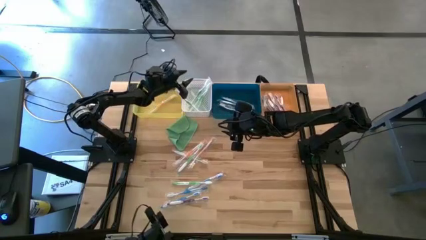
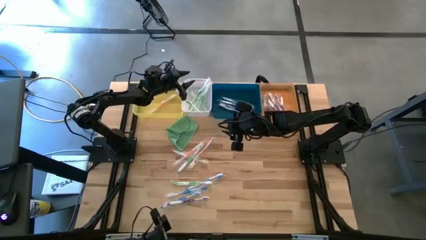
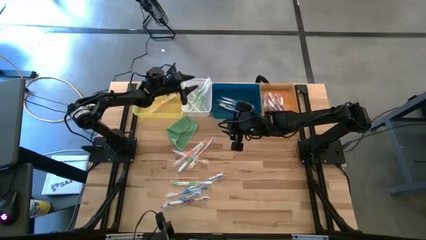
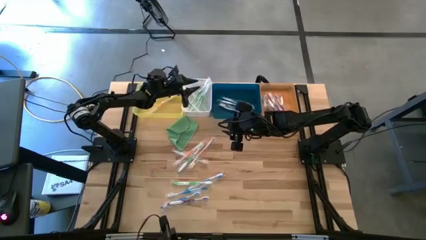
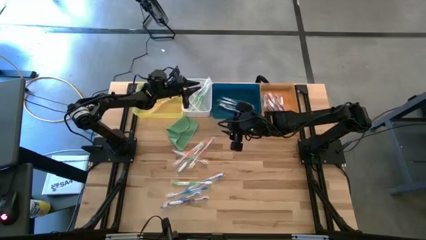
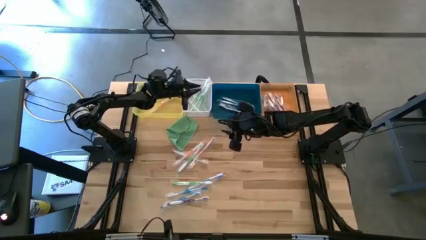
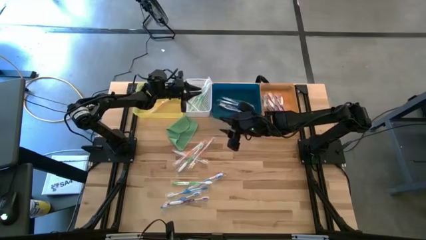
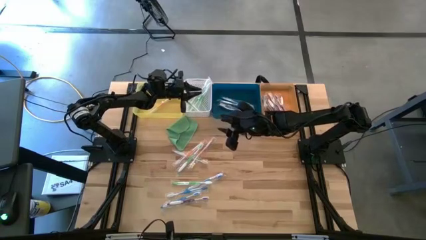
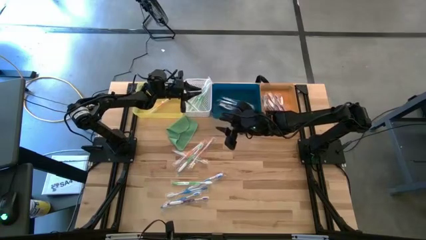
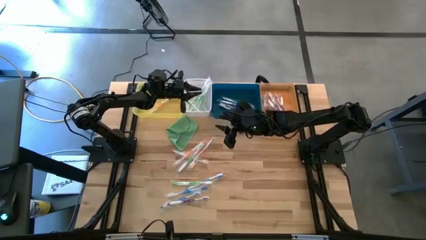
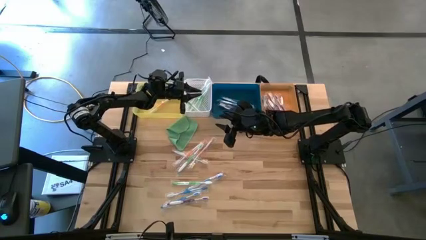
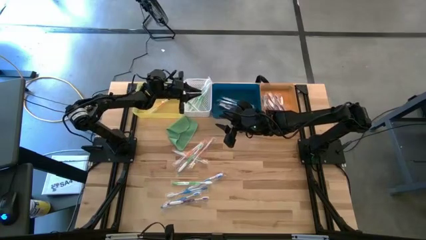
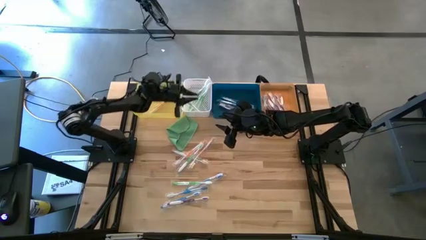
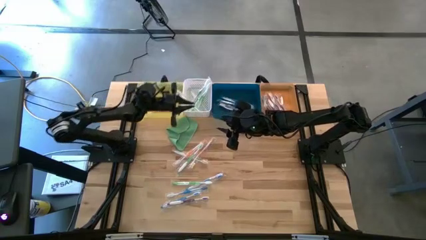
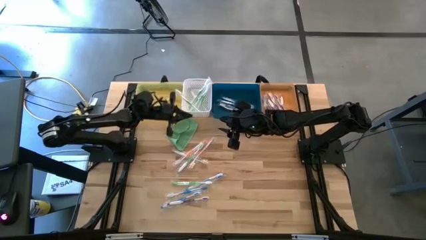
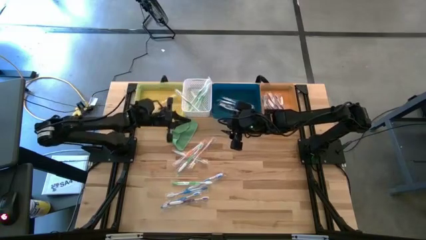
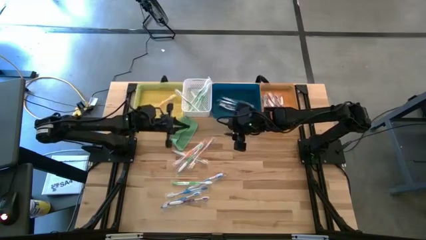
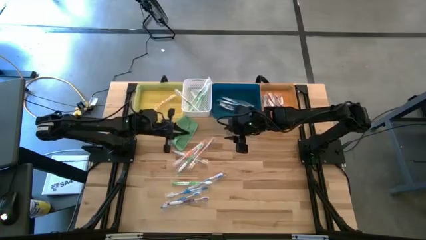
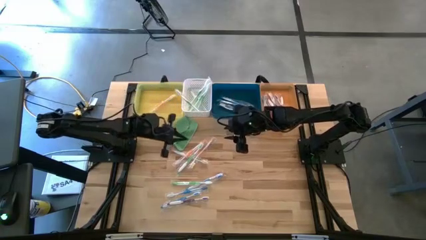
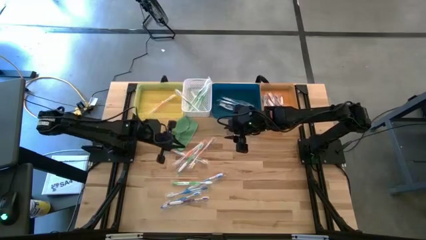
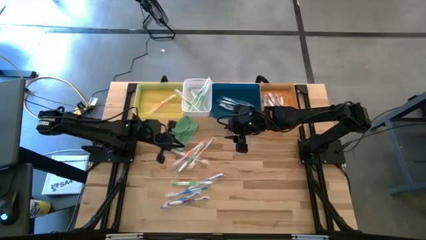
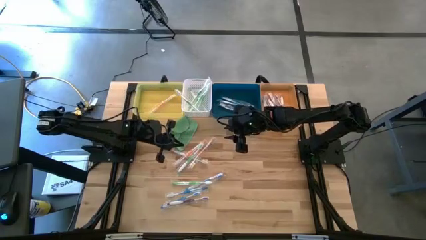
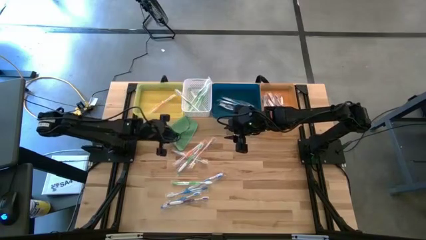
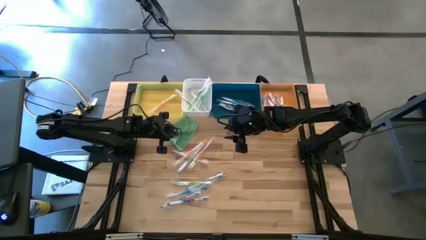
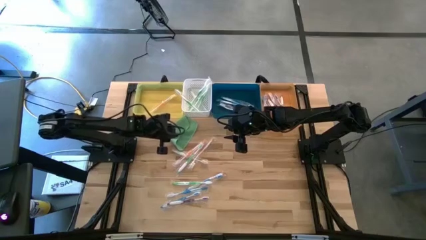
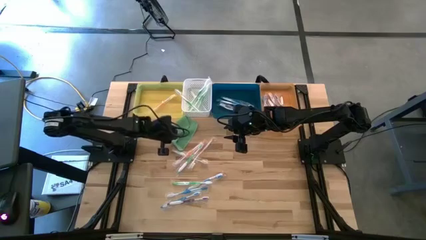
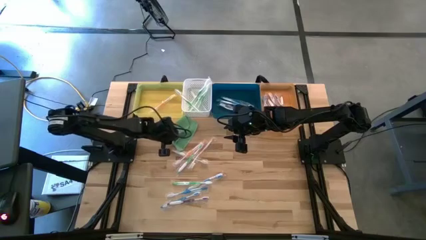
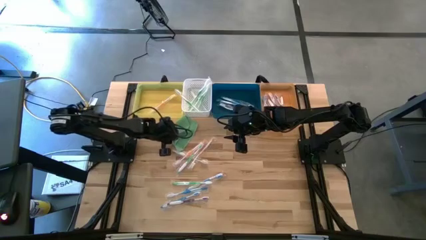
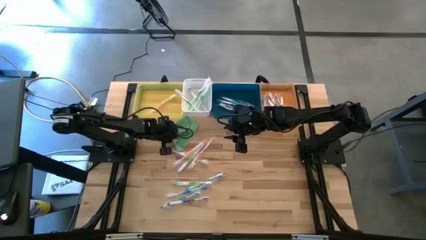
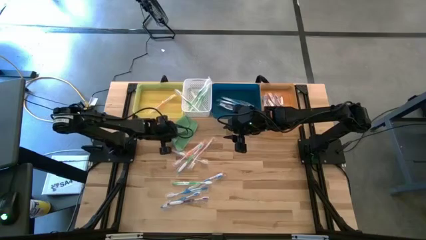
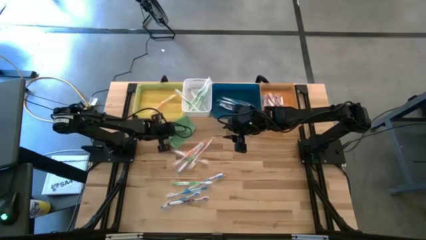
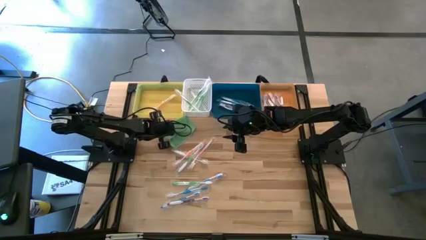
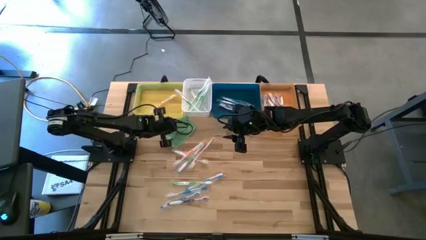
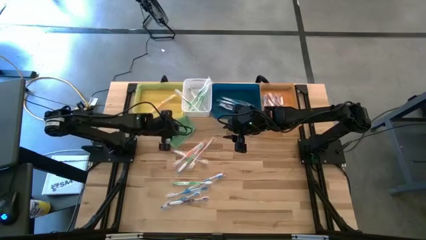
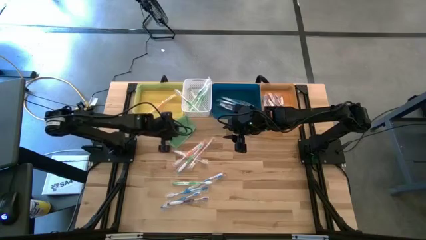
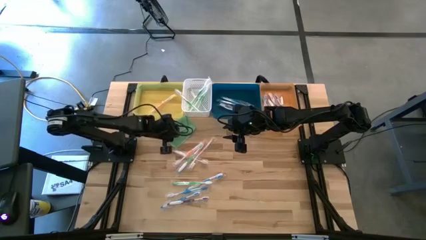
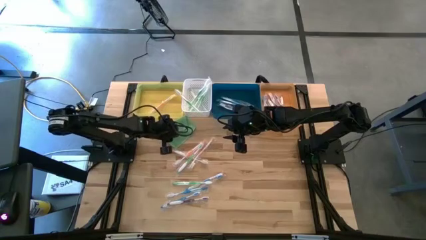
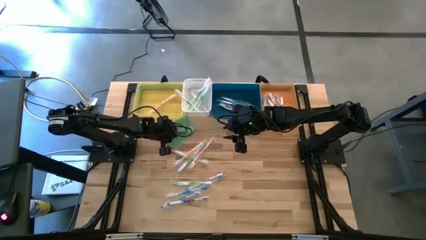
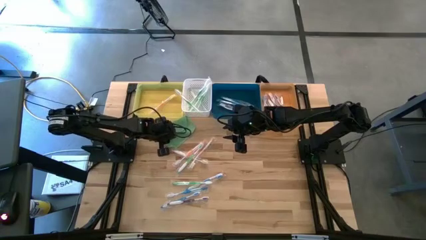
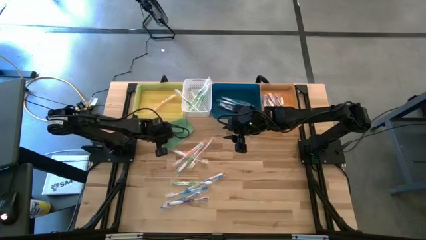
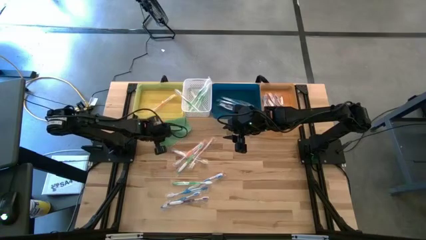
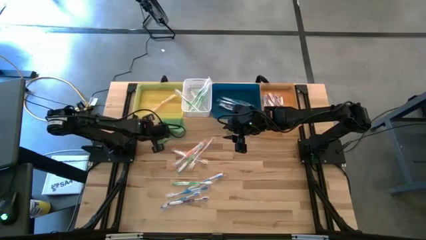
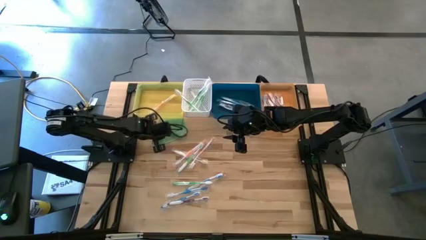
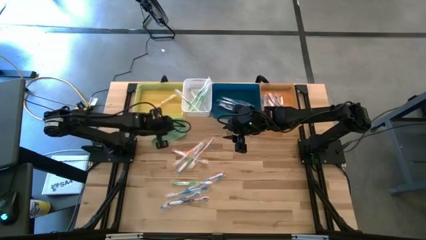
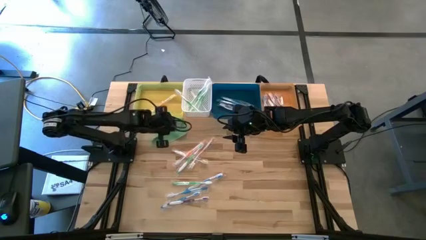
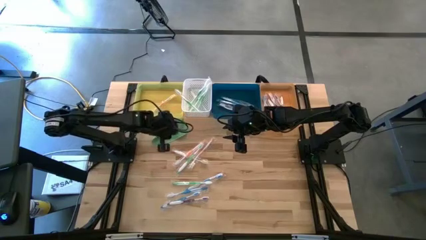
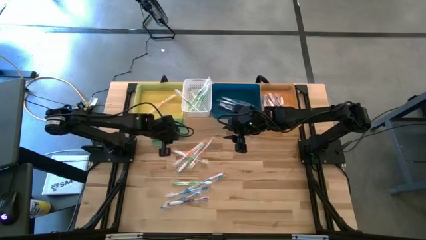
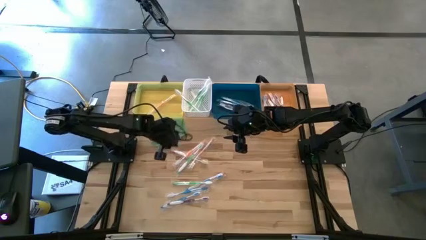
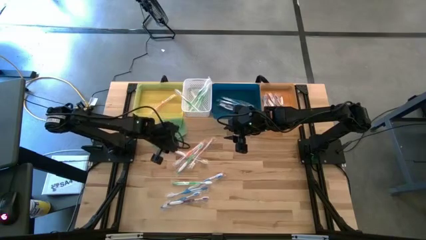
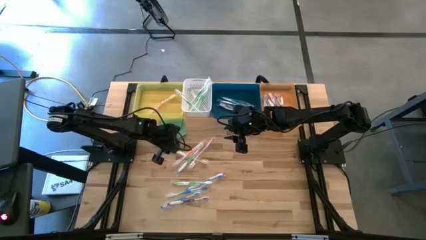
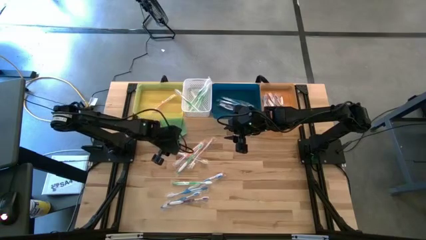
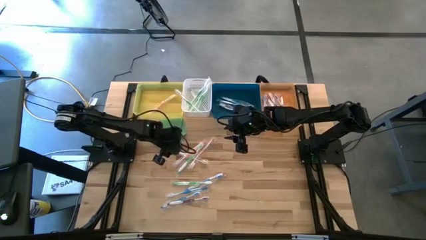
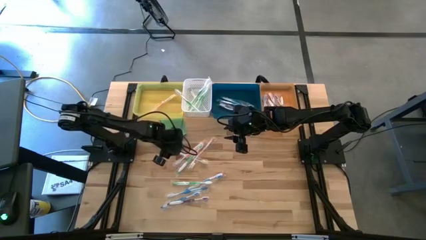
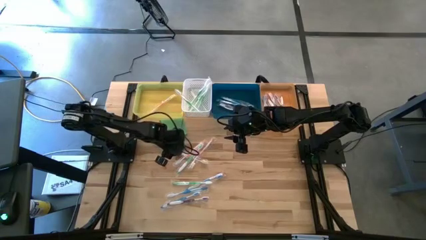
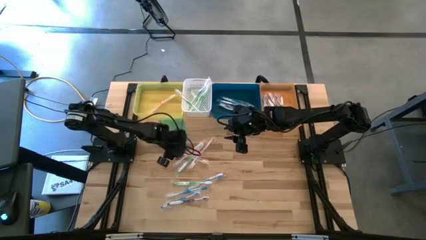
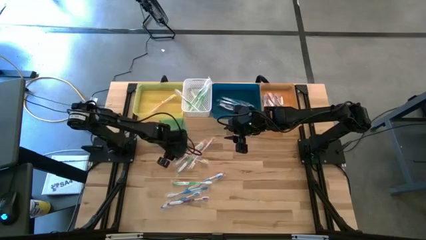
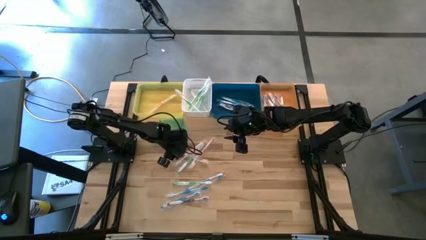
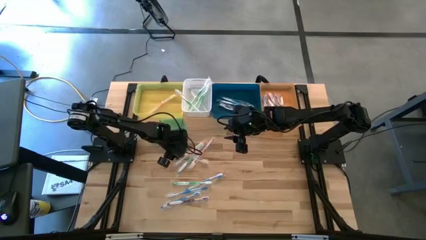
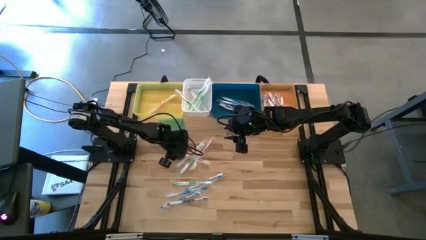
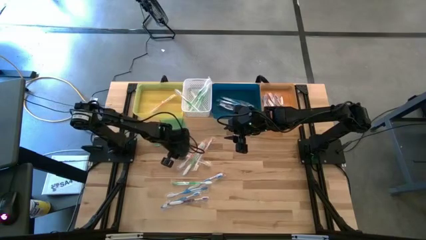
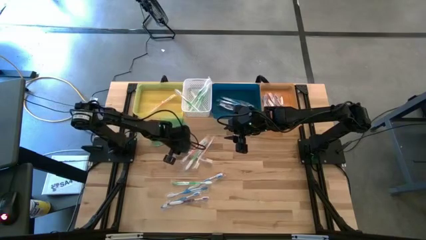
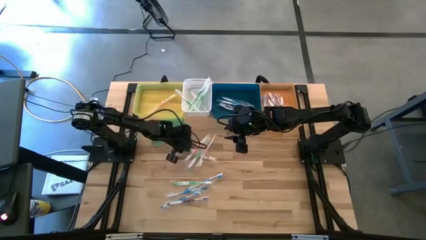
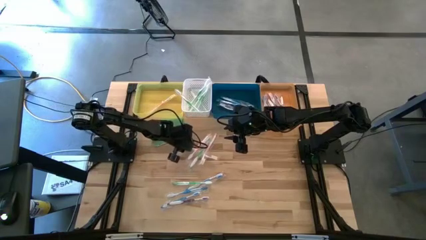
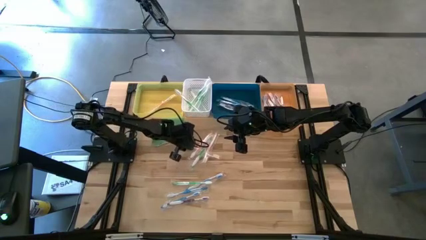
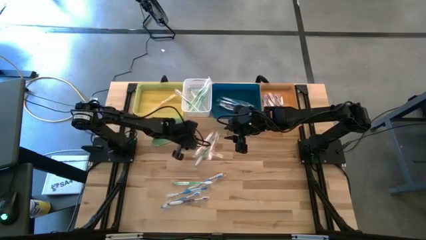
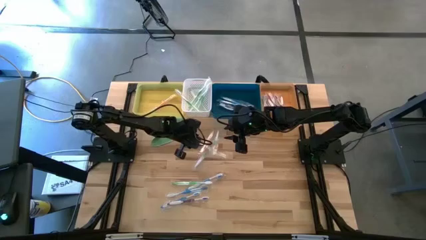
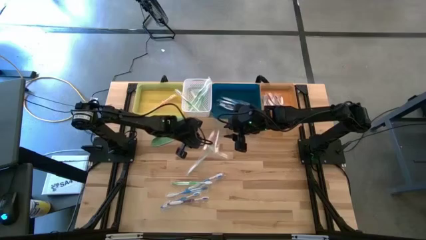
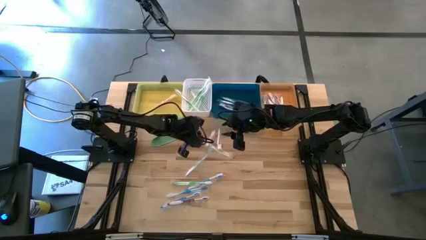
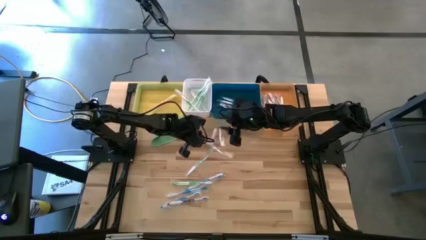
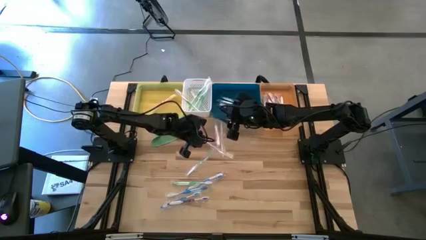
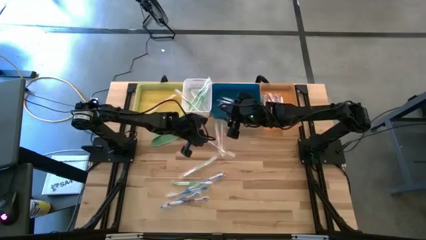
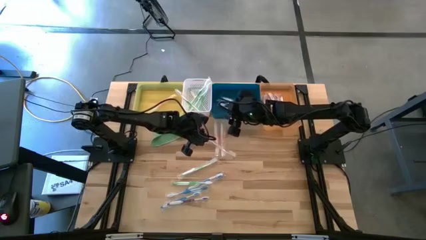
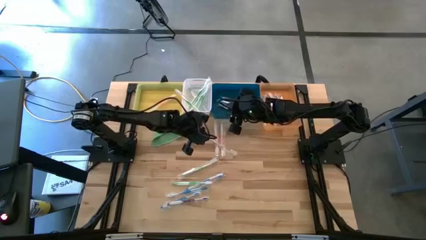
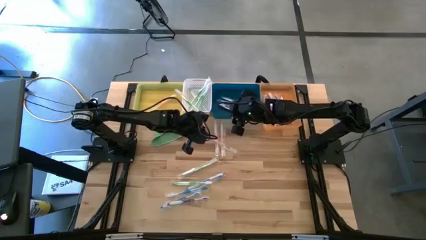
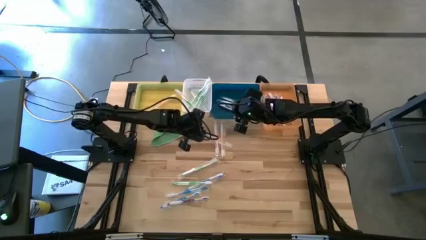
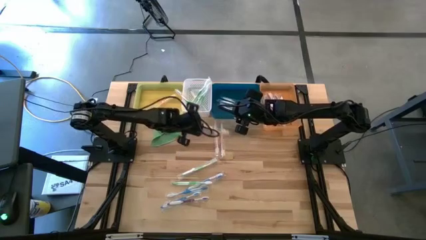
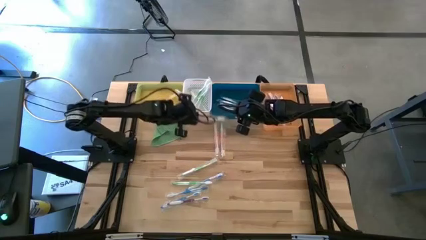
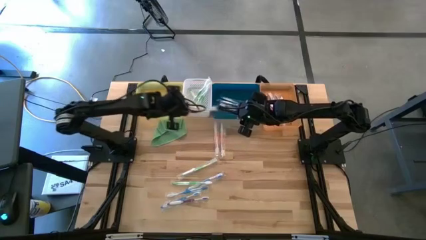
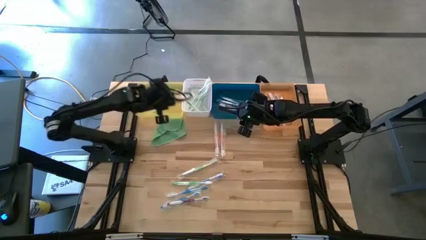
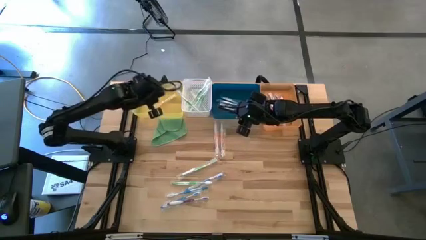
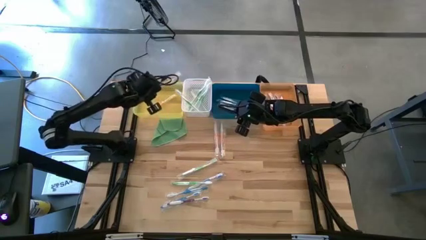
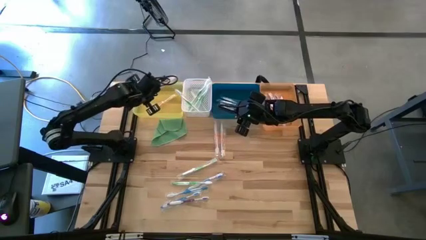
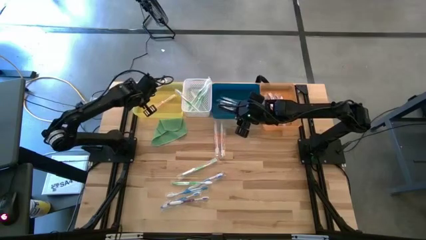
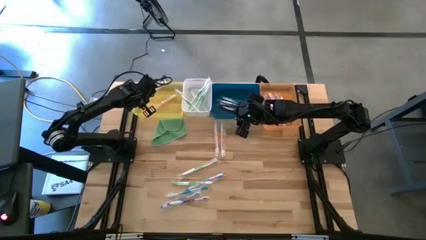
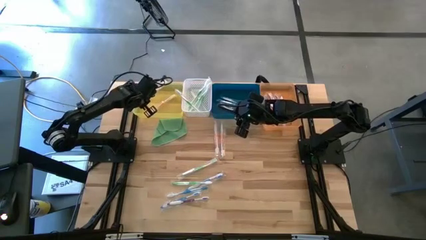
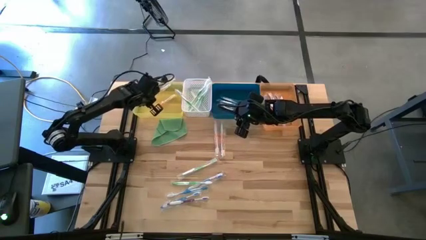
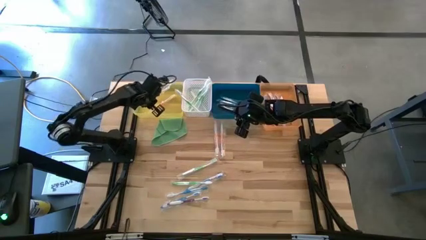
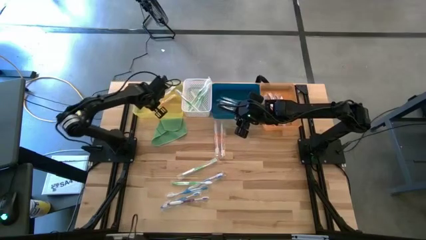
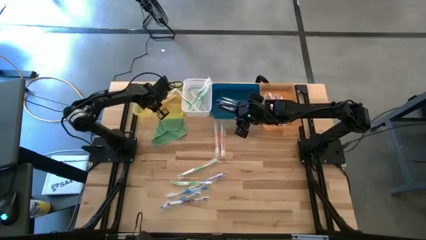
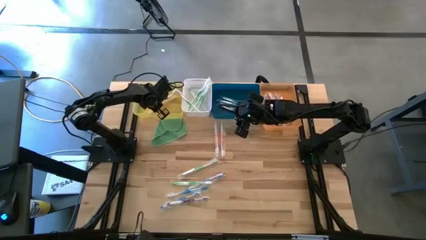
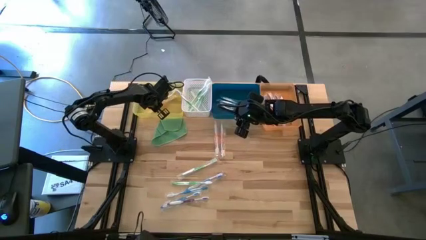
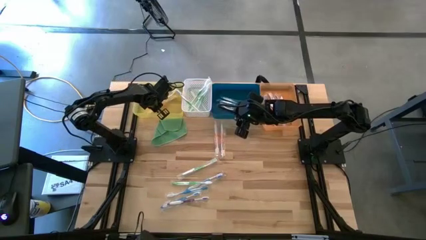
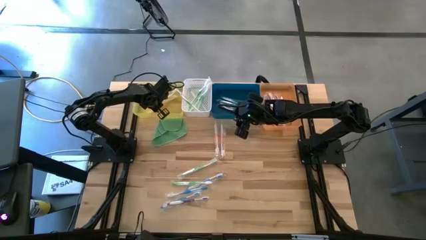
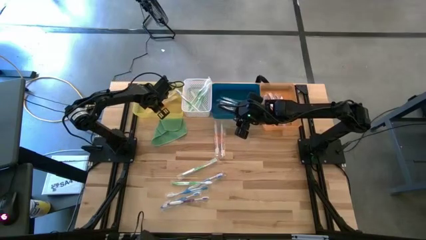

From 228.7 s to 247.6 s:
Task: Pick & Place Toothbrushes
Put the orange toothbrush into the yellow bin
